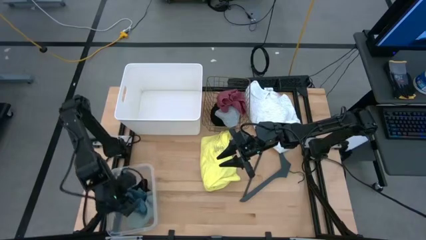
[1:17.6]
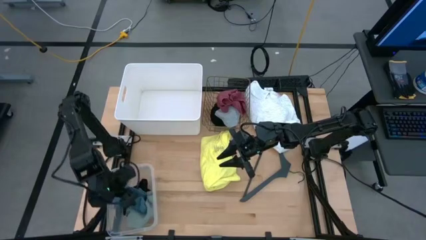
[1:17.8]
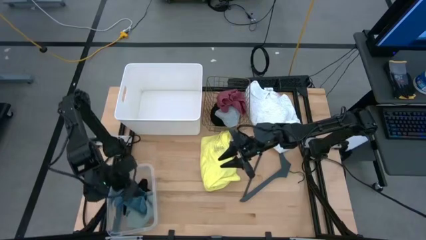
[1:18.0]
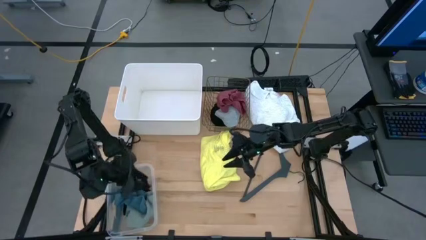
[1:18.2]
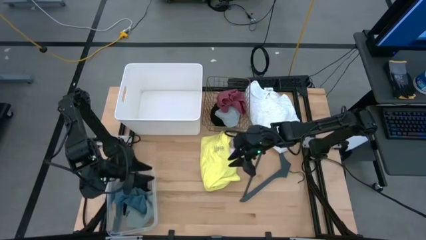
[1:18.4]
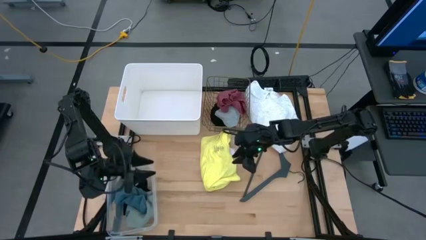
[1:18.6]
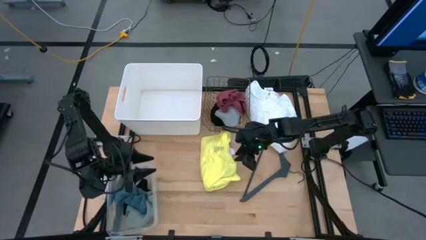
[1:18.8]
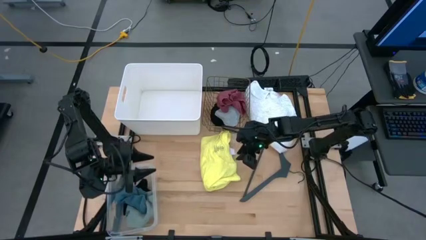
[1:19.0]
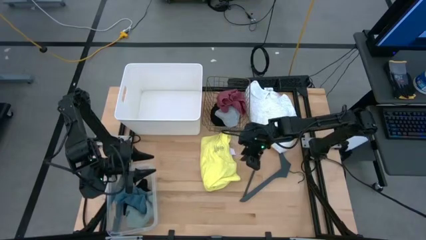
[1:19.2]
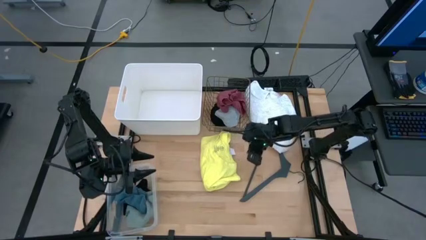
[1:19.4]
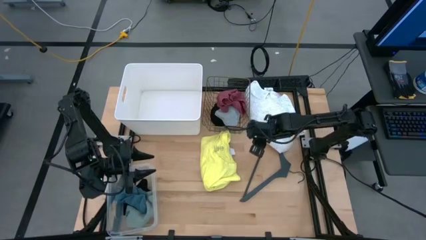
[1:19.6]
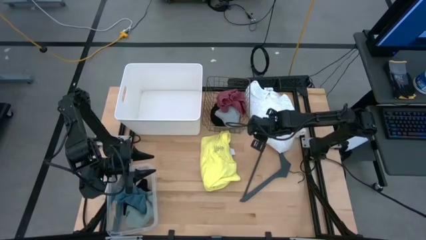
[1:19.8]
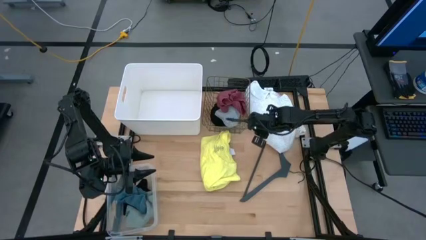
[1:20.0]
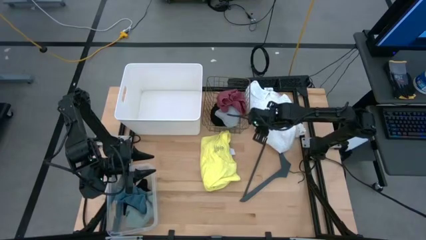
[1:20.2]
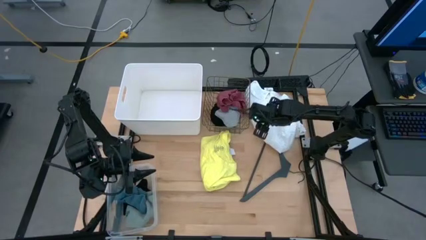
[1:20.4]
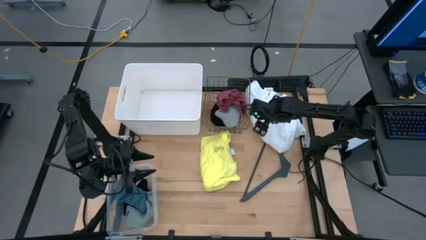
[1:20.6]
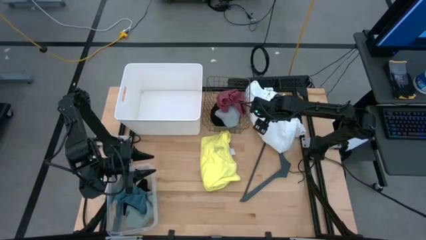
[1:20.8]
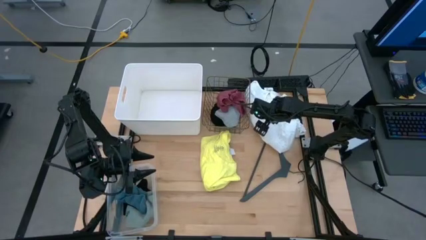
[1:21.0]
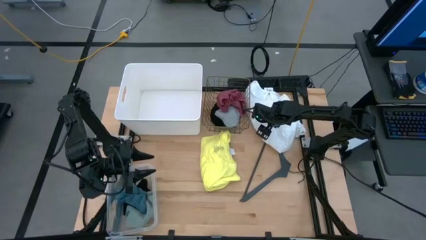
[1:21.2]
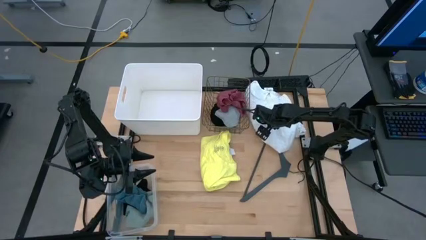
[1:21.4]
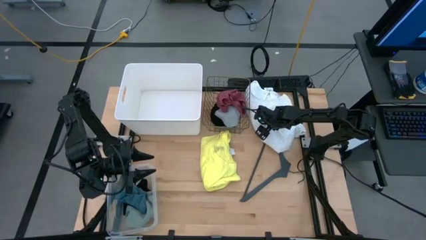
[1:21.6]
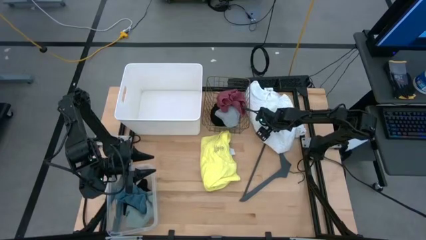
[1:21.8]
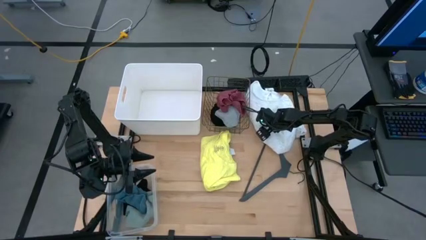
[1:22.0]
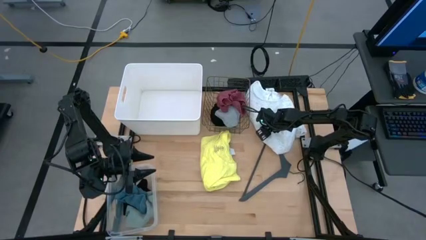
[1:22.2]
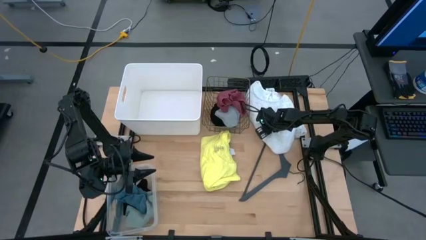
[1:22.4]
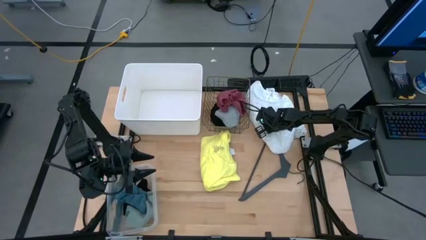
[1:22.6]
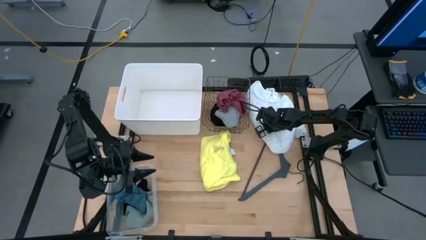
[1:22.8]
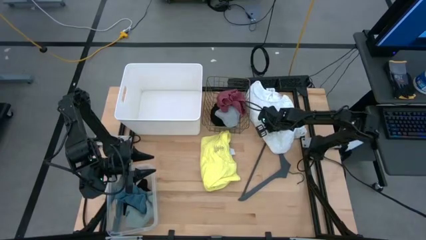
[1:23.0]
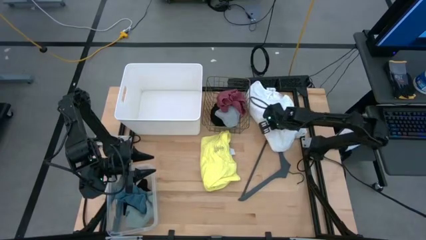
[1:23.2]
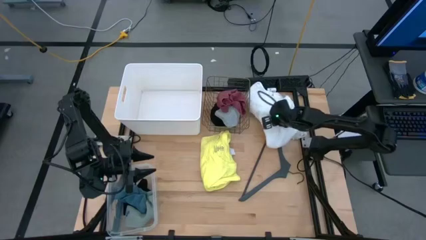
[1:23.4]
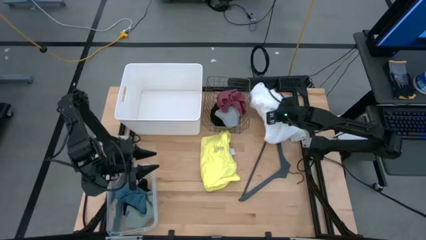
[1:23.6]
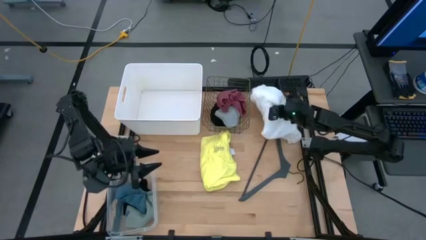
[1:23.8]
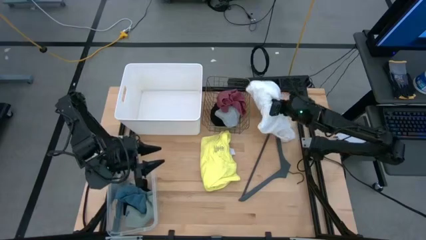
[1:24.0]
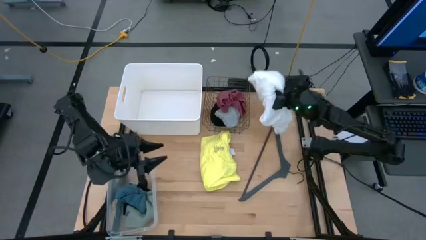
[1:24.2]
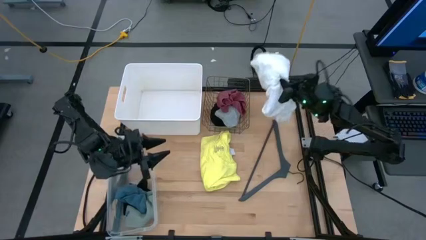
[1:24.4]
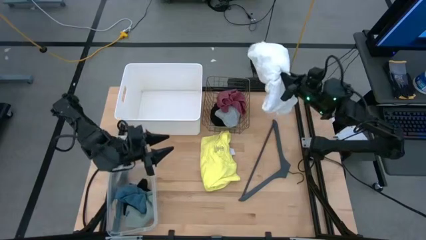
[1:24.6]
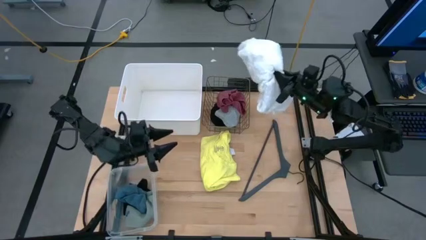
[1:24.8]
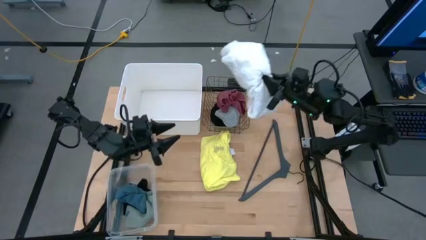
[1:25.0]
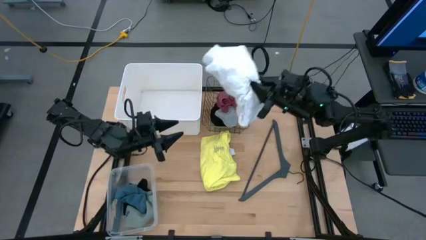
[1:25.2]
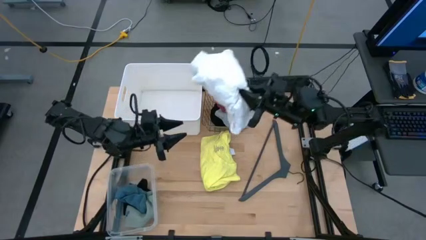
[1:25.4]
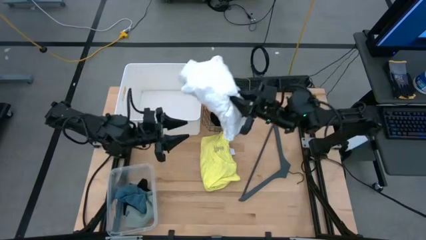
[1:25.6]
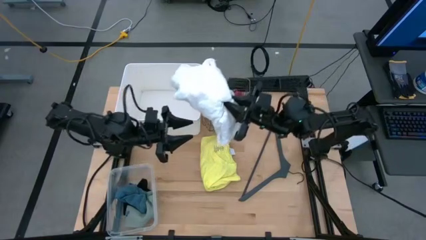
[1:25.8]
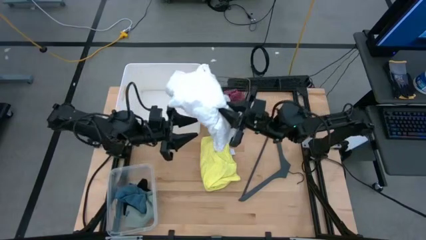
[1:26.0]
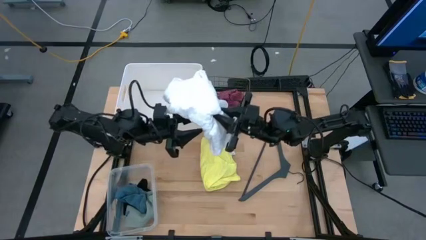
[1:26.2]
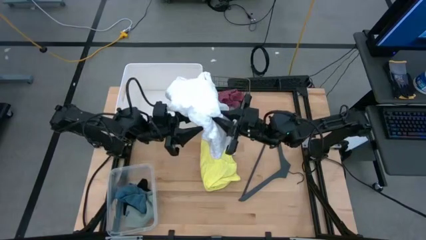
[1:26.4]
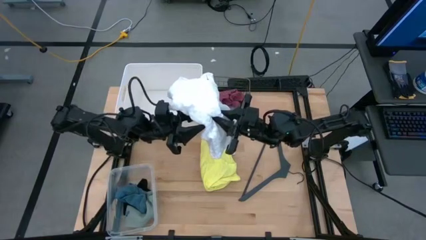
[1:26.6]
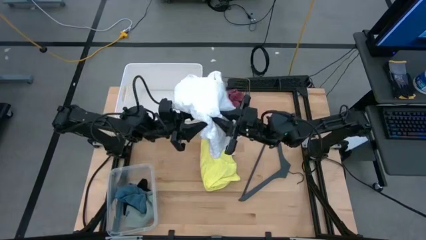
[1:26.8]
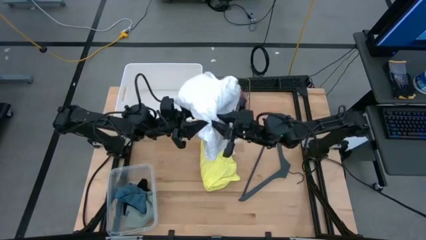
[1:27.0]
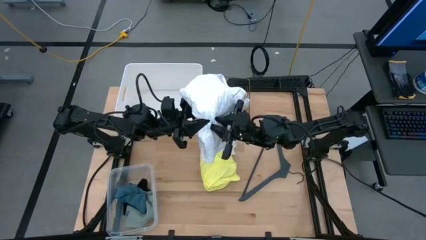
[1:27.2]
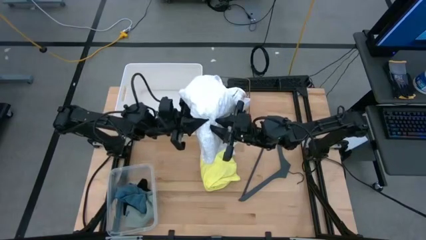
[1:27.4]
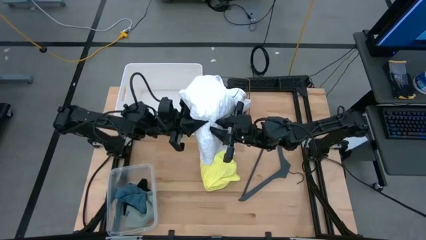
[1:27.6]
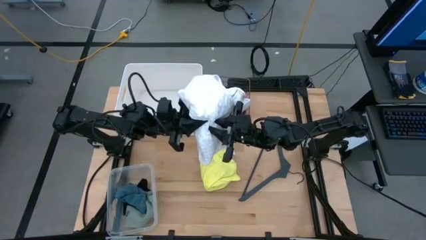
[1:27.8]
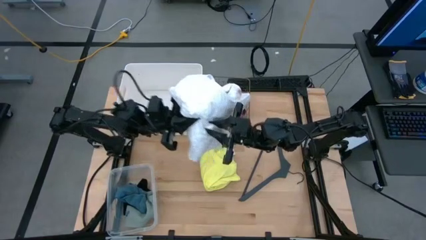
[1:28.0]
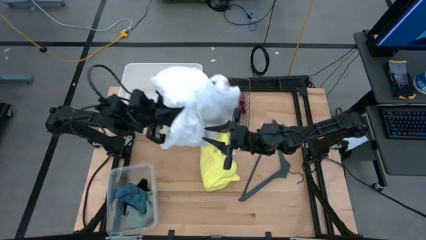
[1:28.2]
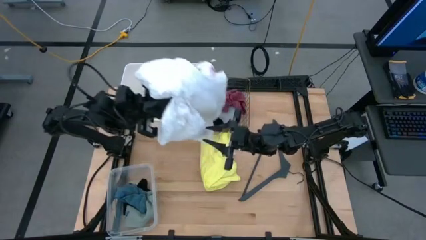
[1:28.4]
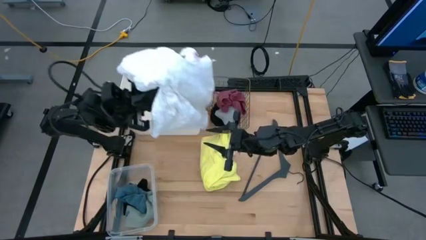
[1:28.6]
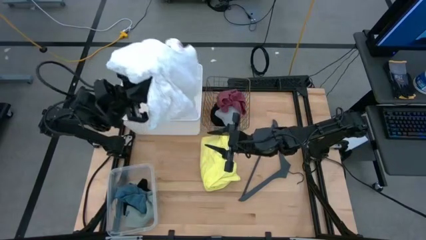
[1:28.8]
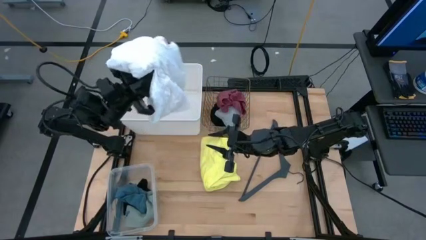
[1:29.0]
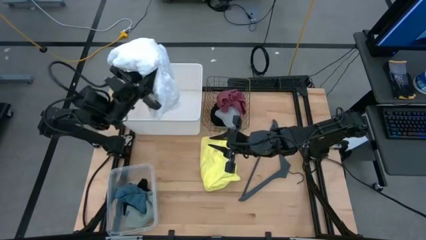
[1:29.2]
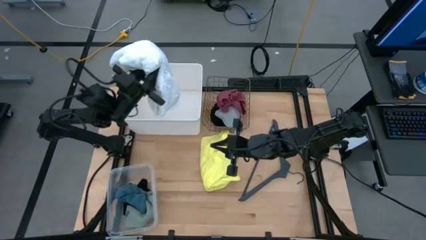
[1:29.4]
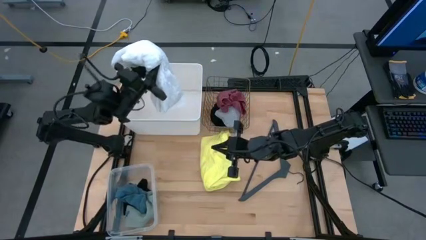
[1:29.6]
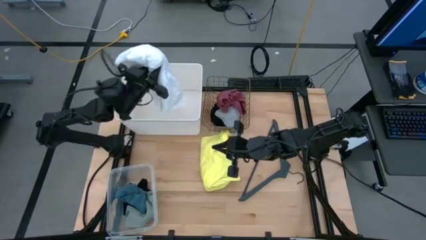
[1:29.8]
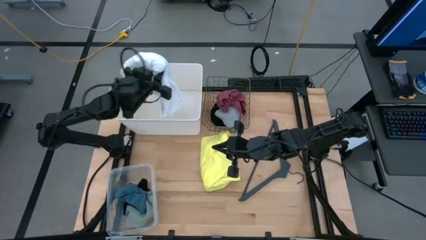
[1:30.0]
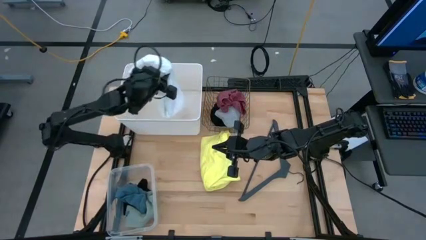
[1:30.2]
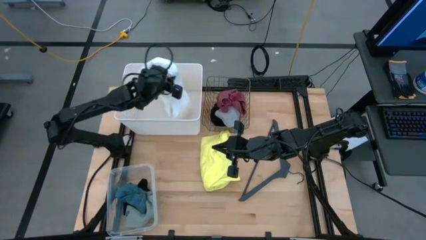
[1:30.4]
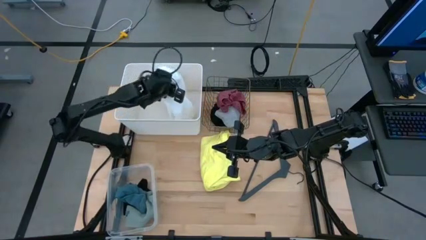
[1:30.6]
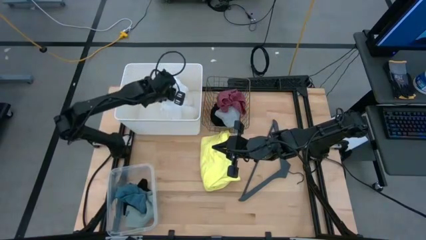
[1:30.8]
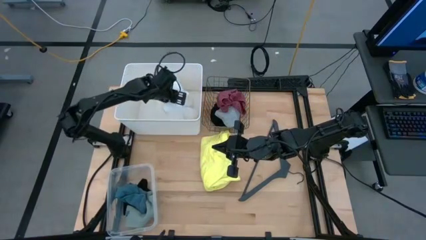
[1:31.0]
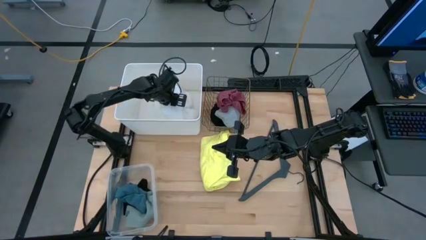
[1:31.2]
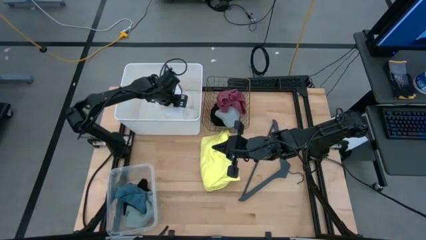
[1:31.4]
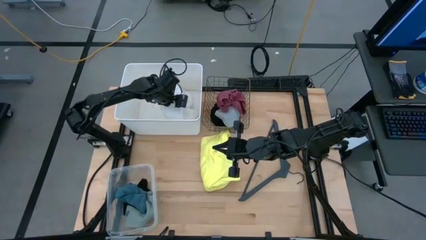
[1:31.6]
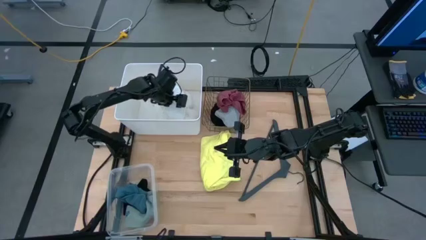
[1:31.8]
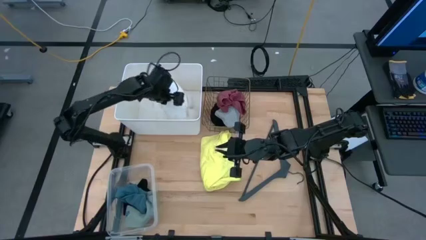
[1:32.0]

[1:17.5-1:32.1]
Task: Pick & Place Cloths
Put the white shirt into the white bin

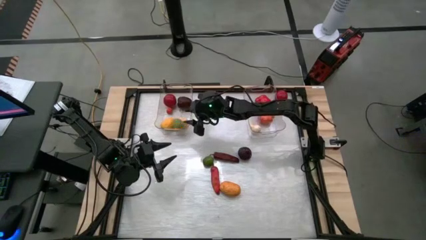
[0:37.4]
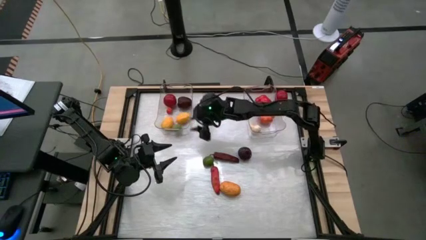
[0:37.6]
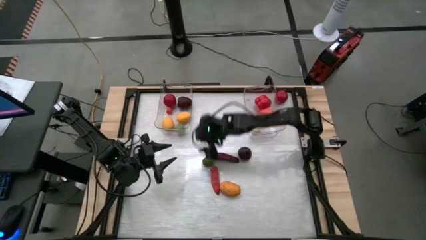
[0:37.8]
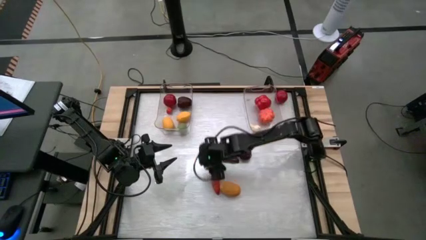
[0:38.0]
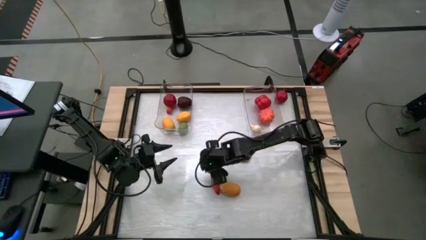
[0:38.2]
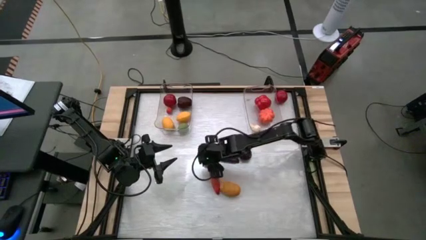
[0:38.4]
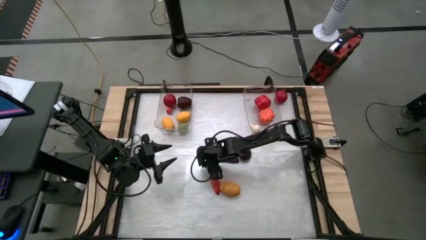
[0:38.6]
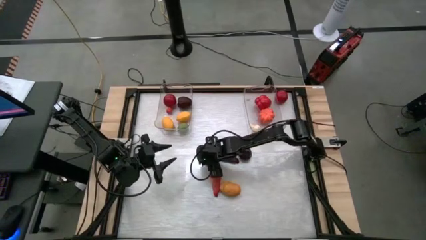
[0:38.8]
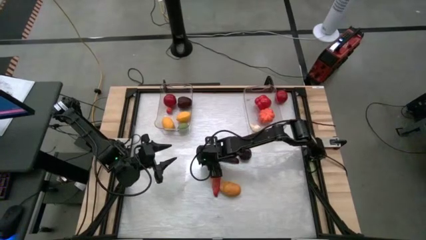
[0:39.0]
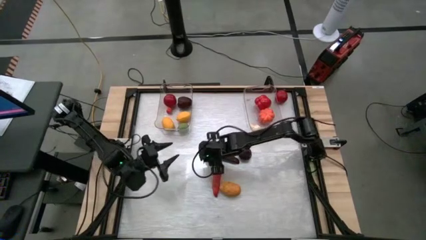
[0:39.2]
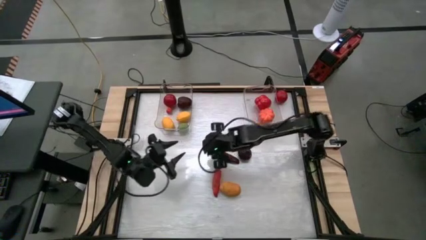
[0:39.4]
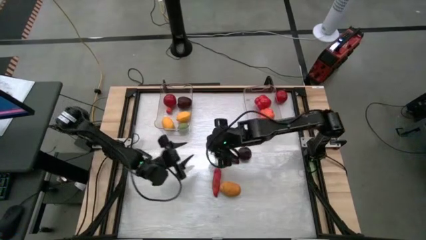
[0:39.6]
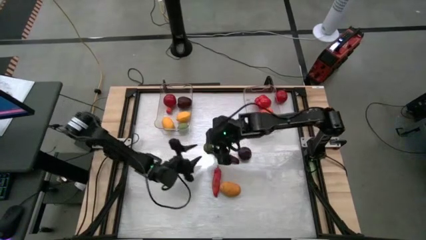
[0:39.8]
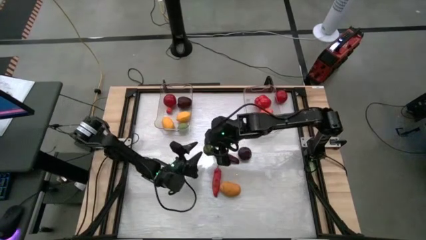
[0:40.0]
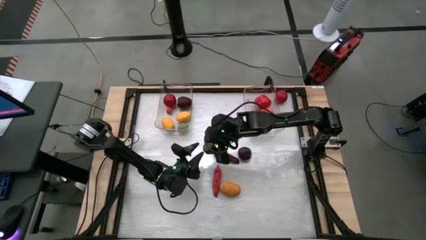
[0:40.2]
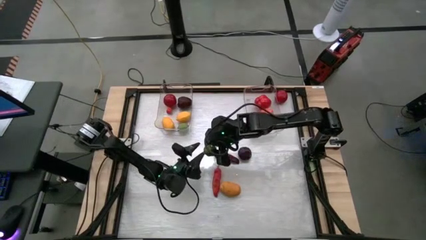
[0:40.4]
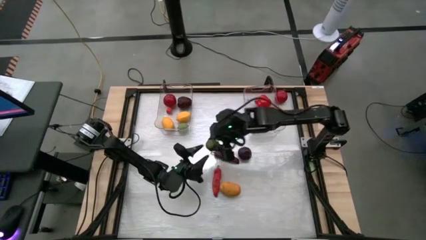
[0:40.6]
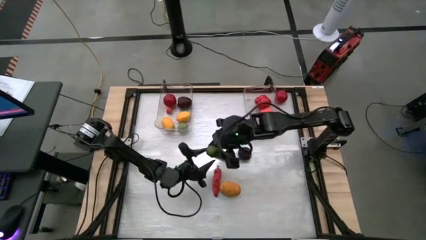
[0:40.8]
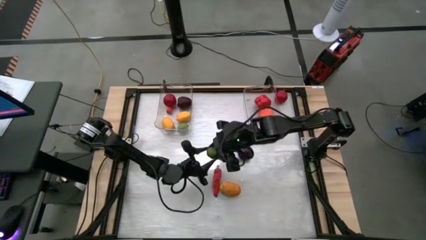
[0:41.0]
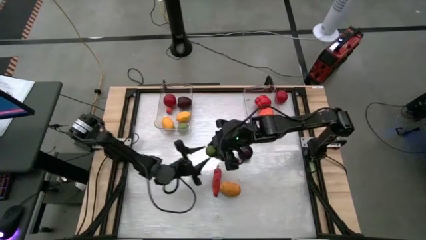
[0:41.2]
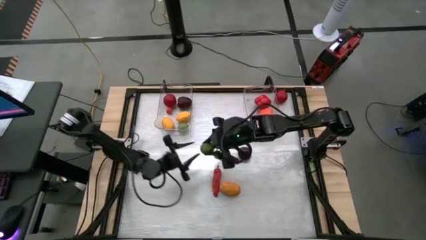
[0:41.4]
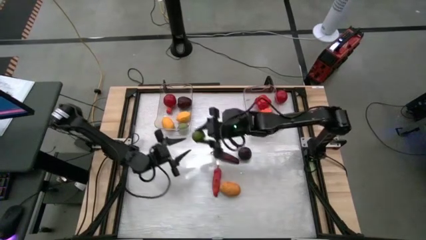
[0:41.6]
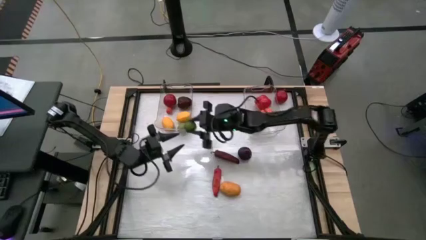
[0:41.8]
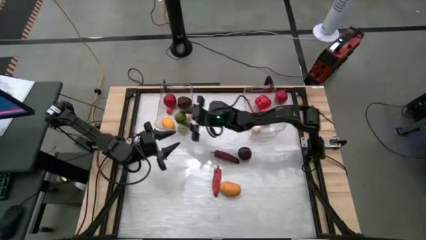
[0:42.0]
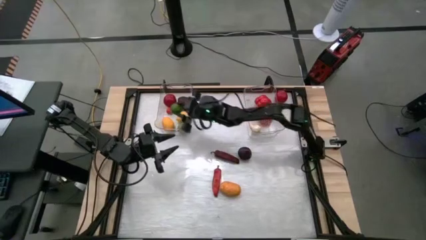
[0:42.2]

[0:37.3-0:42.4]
Task: Sort produce into baskets
Put the lime into the left transparent bin
